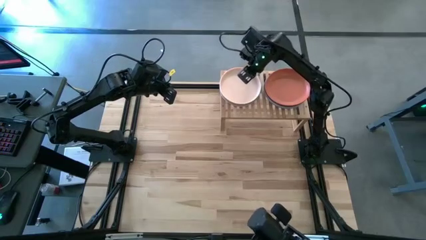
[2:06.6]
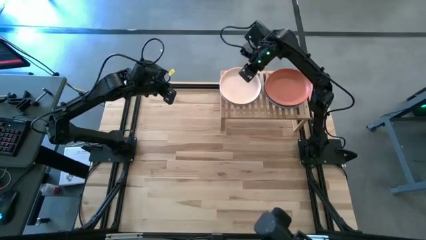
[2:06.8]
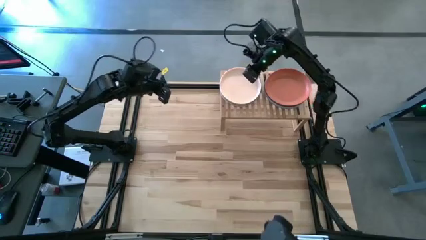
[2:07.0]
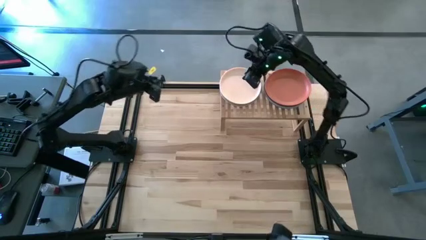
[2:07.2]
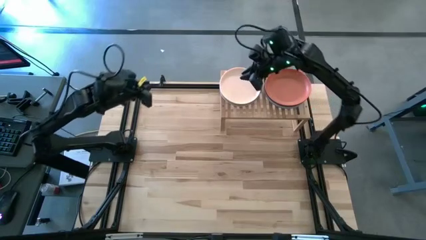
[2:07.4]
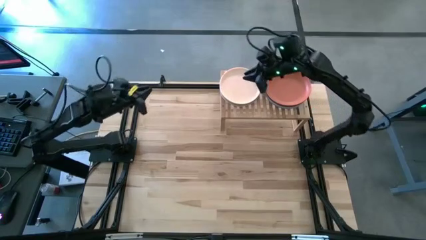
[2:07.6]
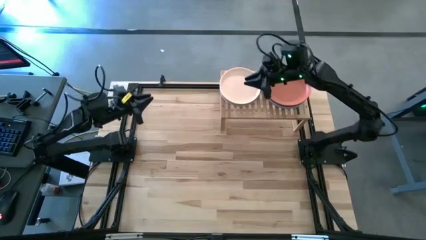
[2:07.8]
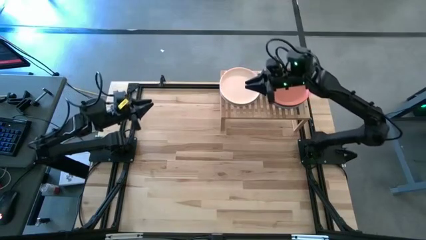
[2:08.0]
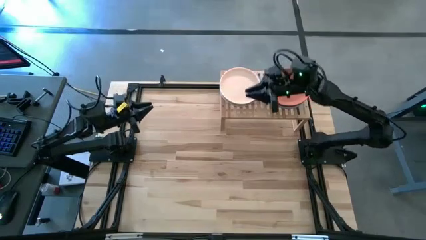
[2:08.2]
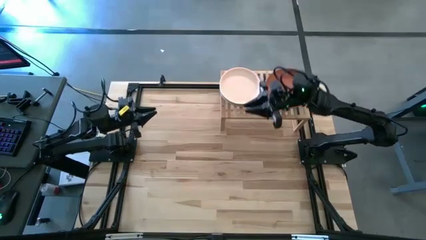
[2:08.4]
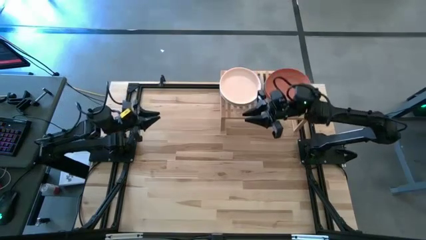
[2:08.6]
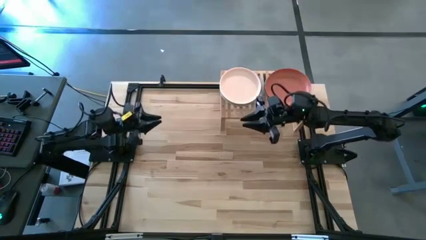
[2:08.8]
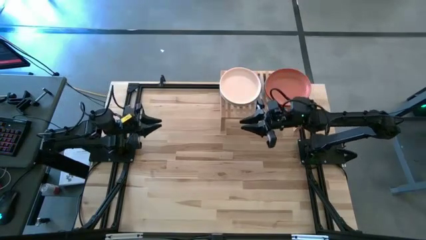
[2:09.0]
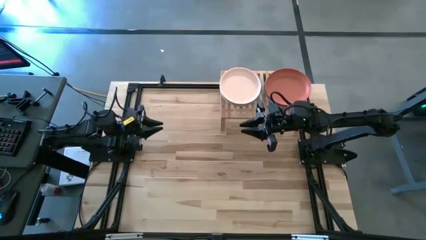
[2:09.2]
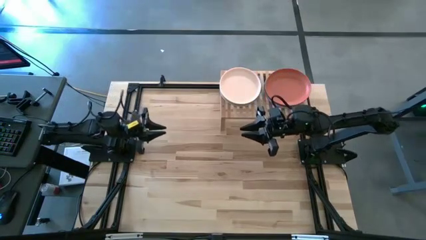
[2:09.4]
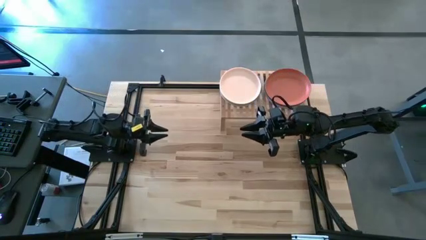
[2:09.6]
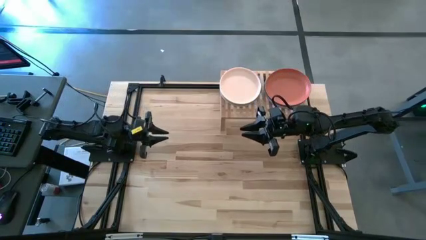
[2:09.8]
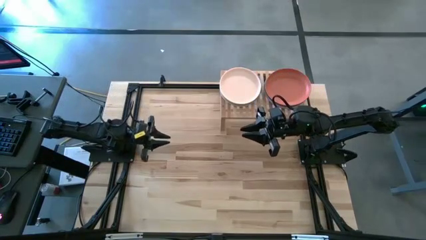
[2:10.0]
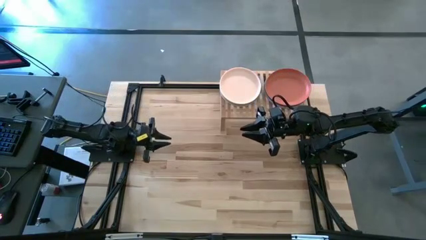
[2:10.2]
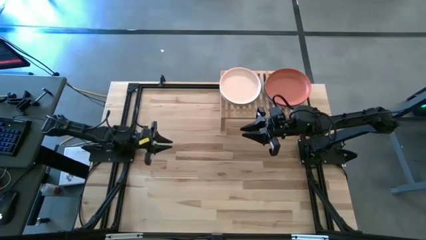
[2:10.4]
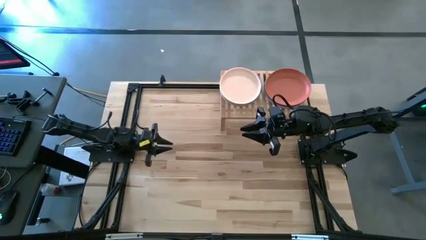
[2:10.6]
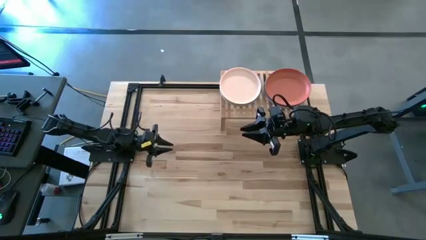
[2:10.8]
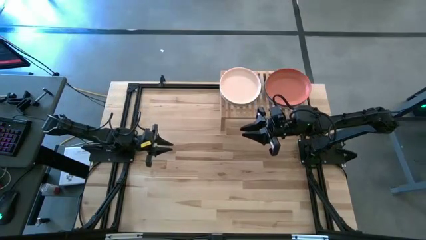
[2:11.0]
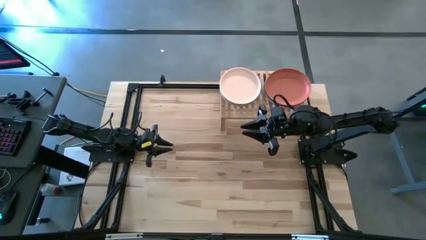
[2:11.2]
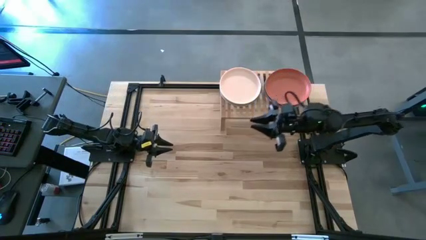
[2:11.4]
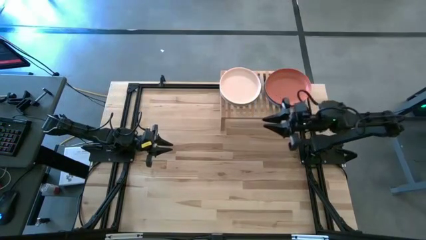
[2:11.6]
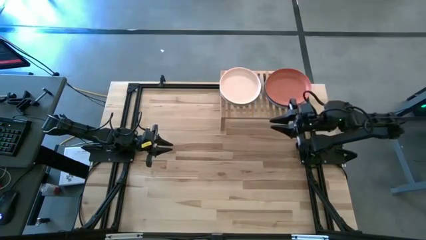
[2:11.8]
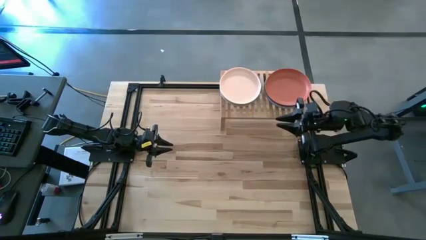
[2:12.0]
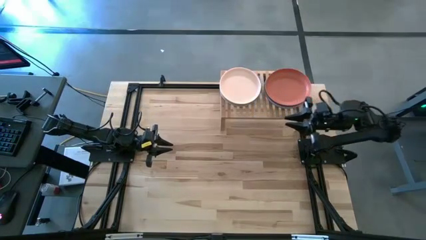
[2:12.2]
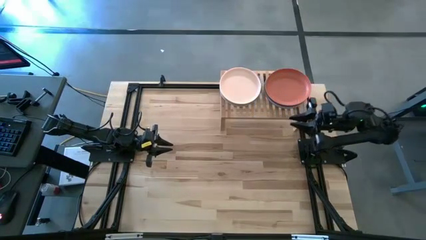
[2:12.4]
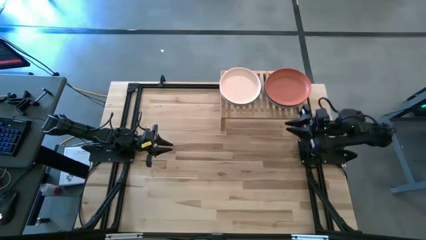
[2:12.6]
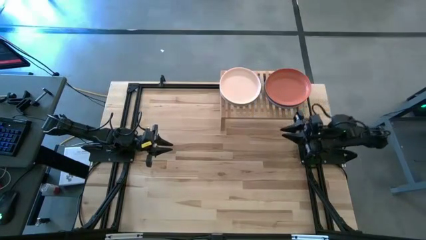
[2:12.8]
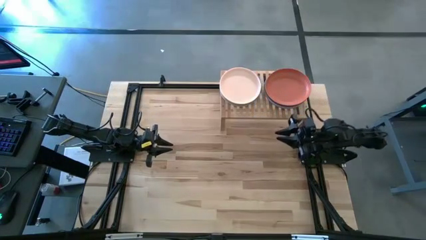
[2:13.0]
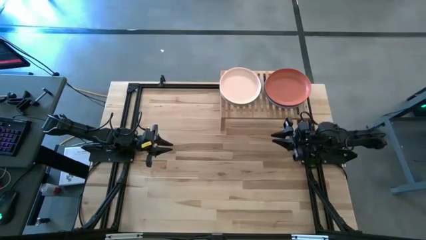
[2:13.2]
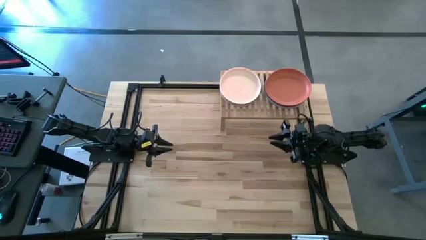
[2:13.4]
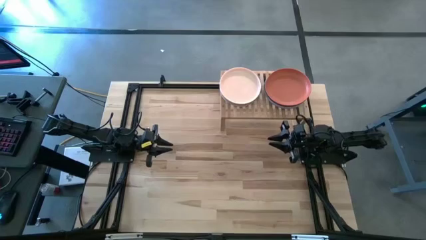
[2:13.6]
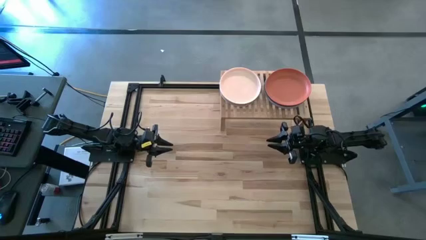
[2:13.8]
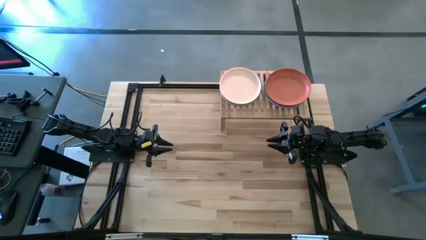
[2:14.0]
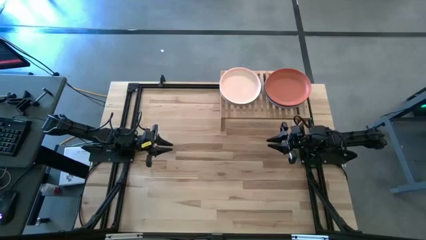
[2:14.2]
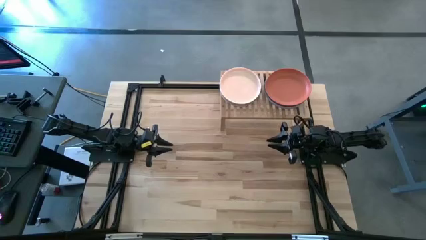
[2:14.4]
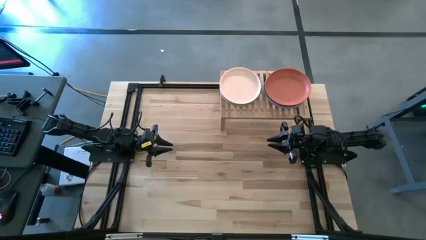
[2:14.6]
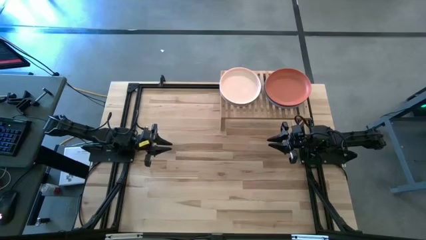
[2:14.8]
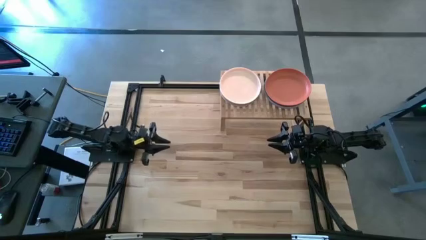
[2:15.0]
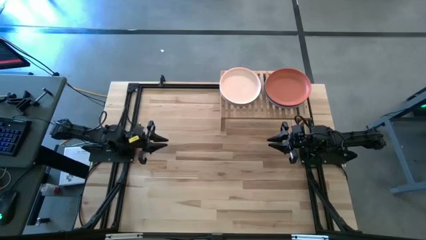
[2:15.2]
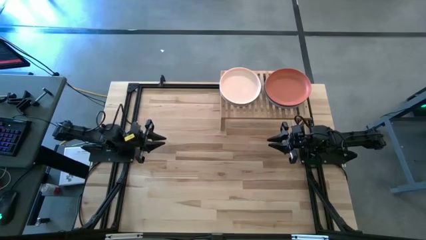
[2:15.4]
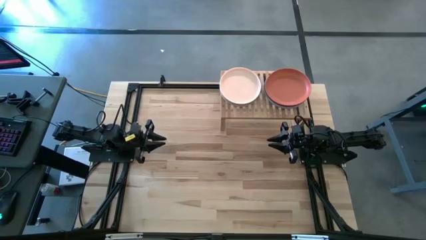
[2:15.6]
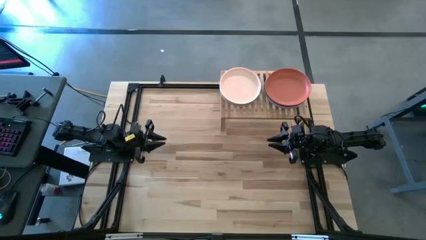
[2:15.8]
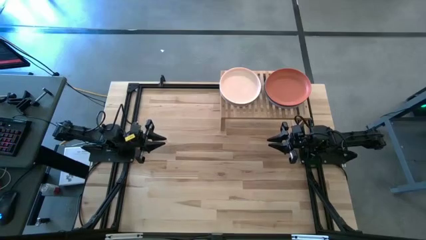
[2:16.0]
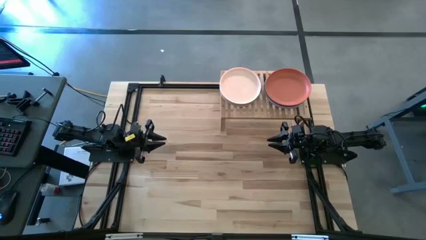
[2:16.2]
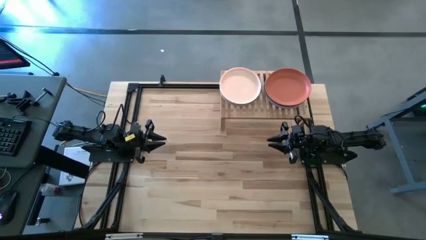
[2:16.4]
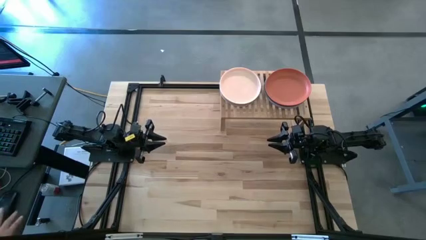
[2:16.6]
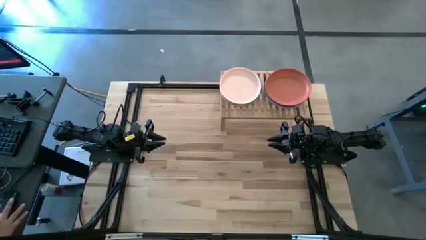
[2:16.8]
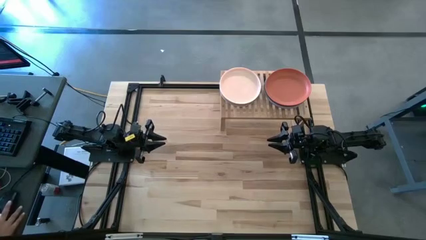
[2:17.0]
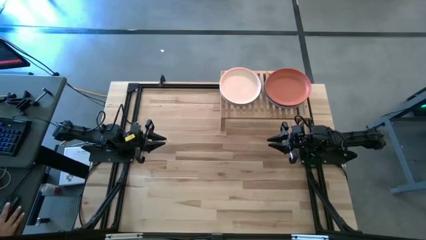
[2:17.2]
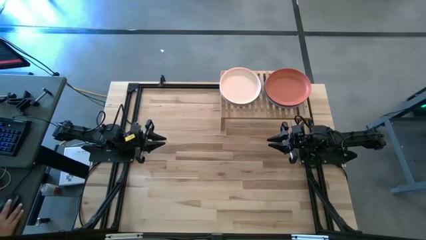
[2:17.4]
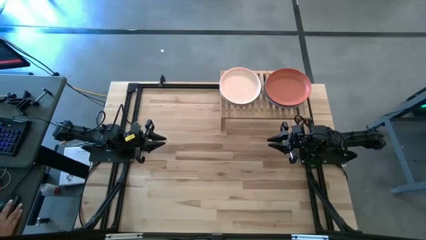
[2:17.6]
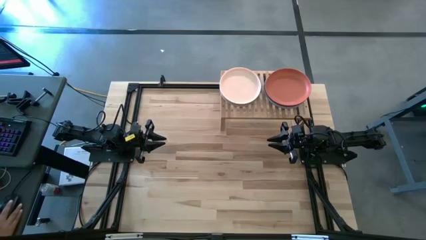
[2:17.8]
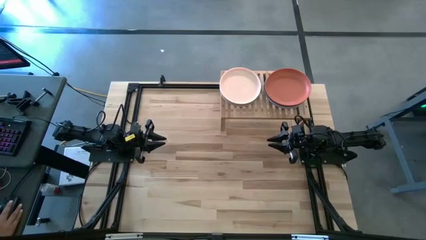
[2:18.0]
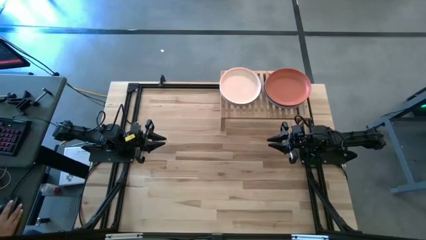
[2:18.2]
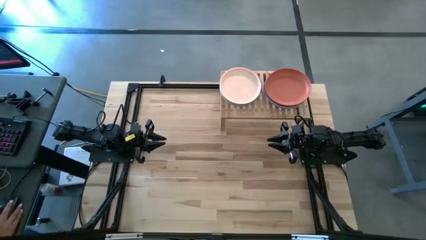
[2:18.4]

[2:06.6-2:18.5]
Task: Place and stack plates onto a shelf
Return to Home Position

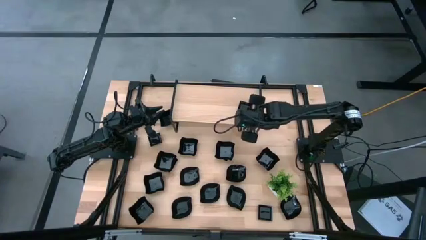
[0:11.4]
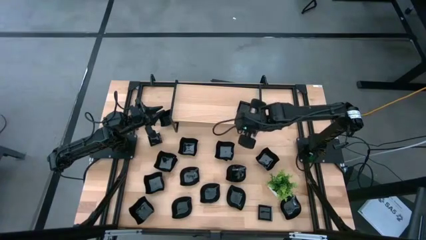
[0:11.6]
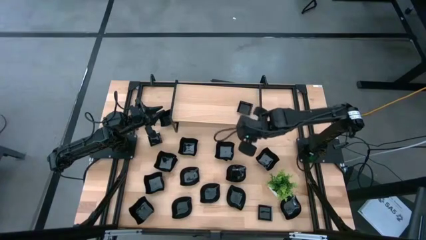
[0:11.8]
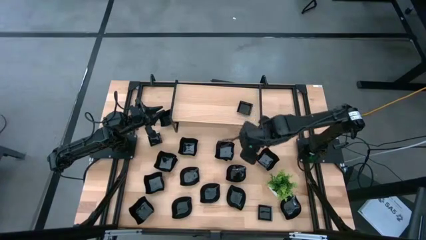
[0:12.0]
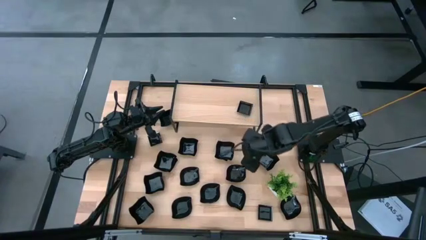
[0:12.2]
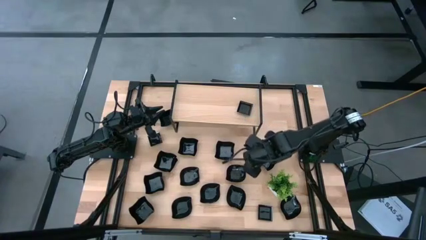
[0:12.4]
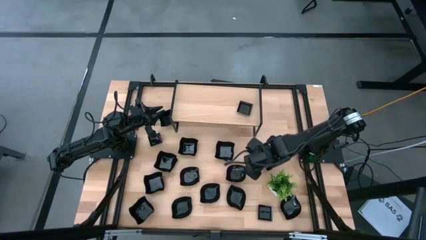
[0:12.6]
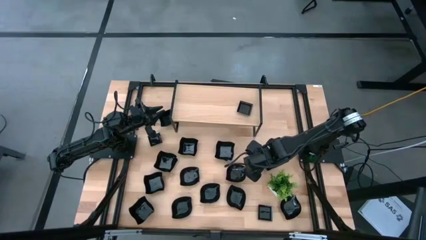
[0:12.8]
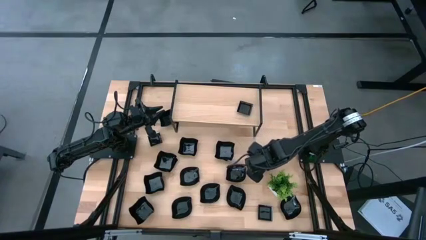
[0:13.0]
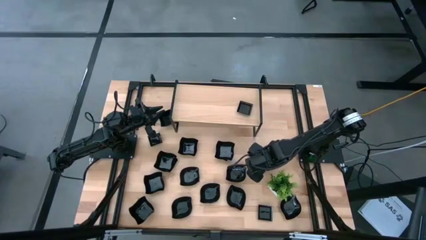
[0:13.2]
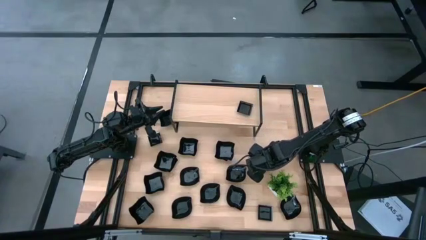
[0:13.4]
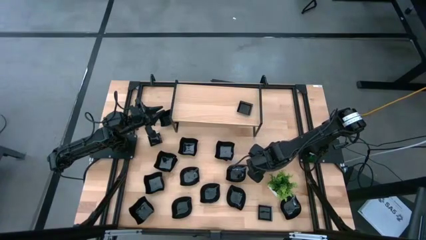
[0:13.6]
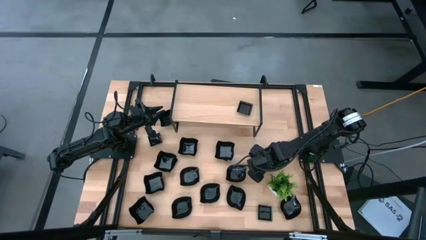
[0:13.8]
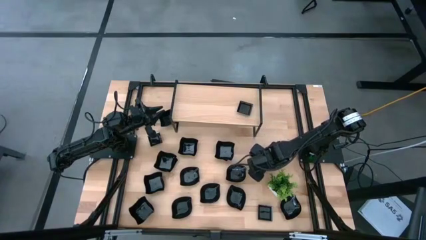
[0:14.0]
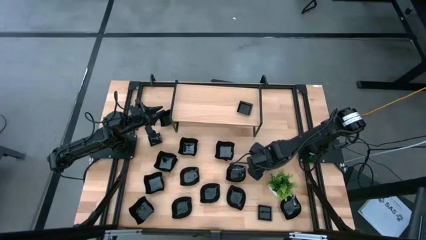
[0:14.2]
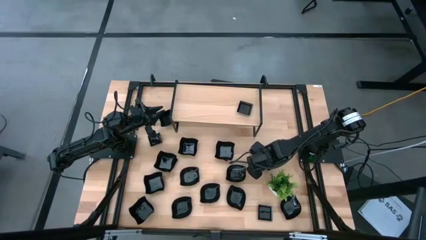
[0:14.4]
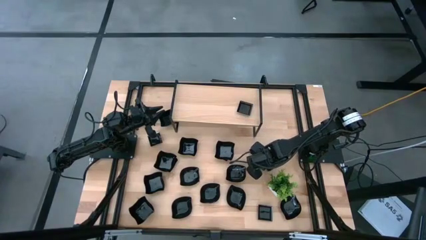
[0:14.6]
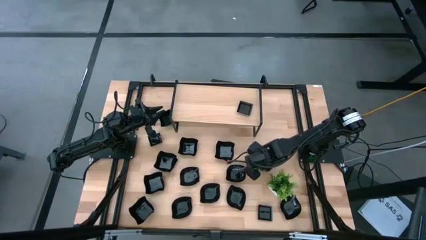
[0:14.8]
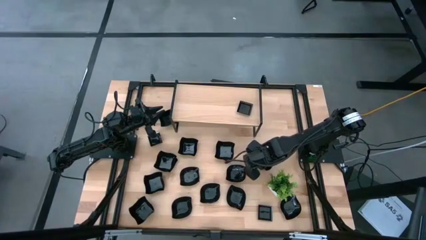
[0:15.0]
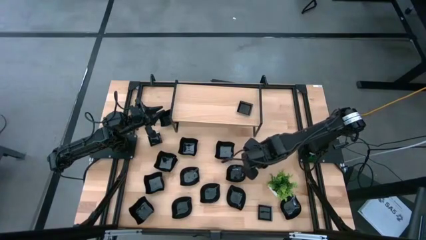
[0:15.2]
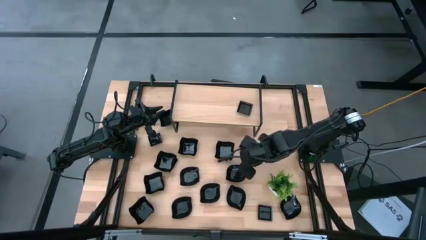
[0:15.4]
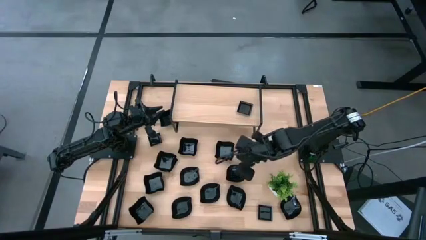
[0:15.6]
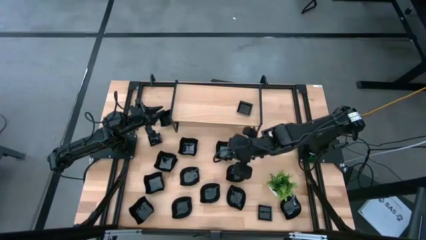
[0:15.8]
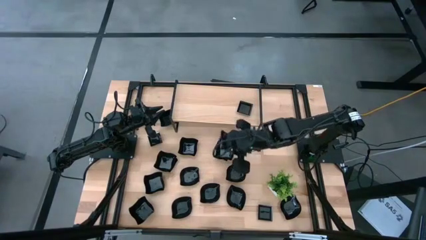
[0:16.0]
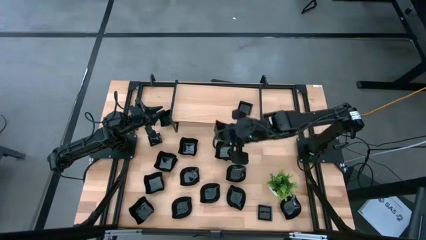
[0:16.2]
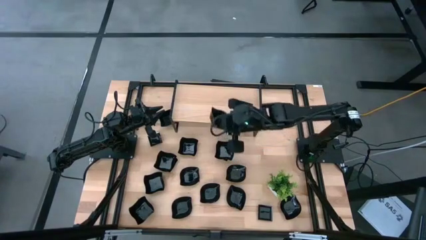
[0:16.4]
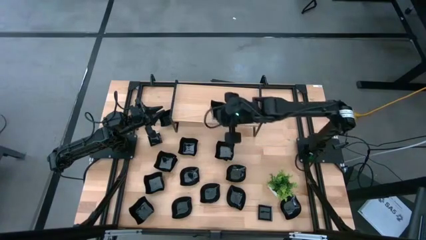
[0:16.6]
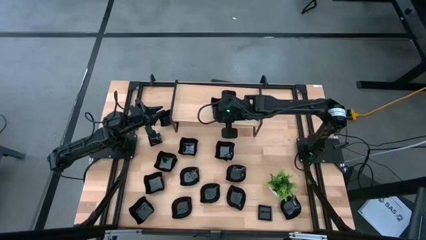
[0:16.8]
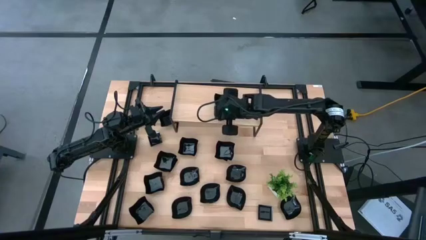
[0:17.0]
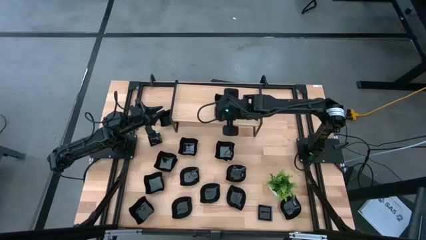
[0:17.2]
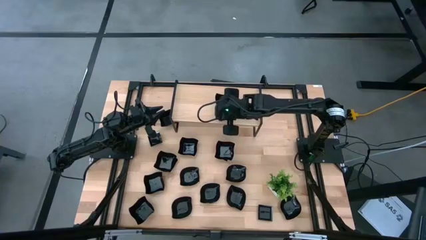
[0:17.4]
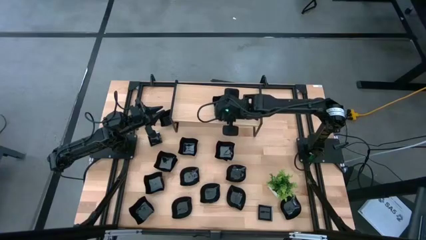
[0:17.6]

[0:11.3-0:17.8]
Task: Pick & Place Mini shaped plates
Put the distorted square plate on the shelf
